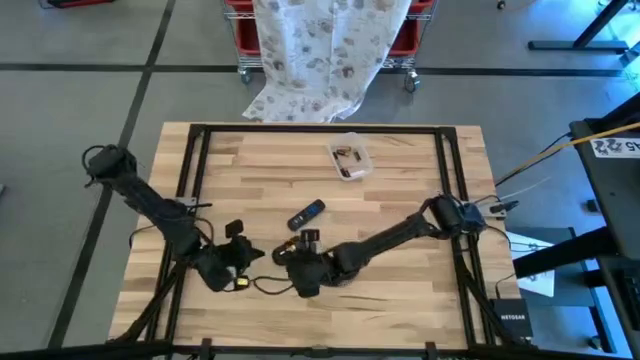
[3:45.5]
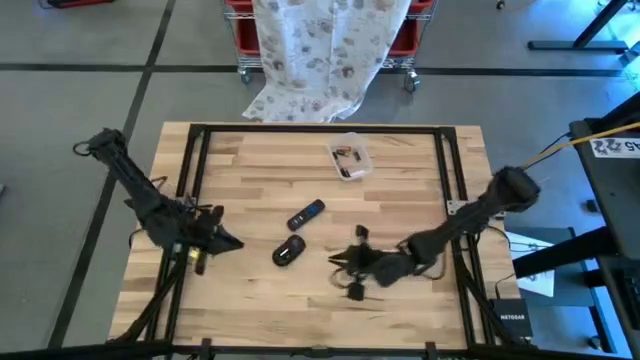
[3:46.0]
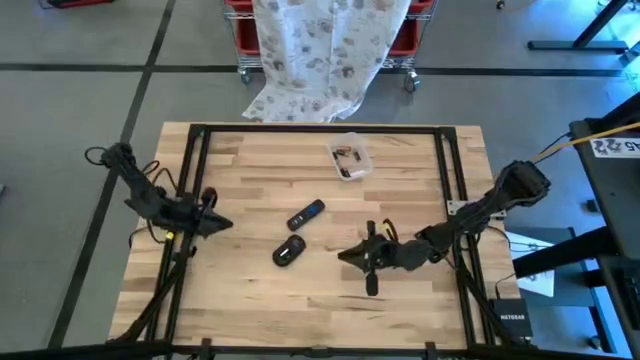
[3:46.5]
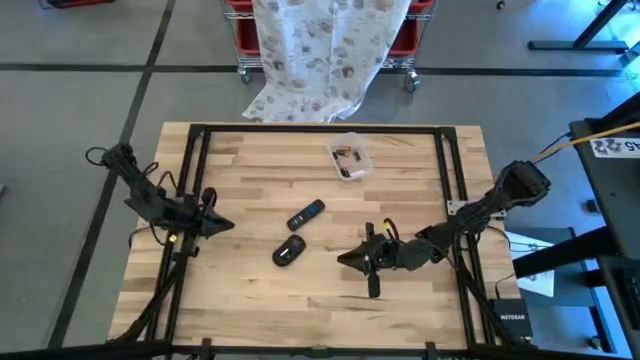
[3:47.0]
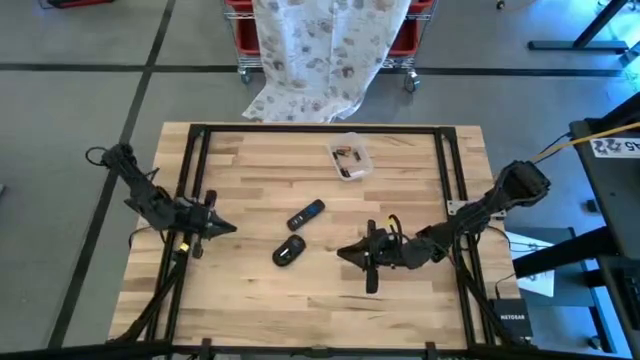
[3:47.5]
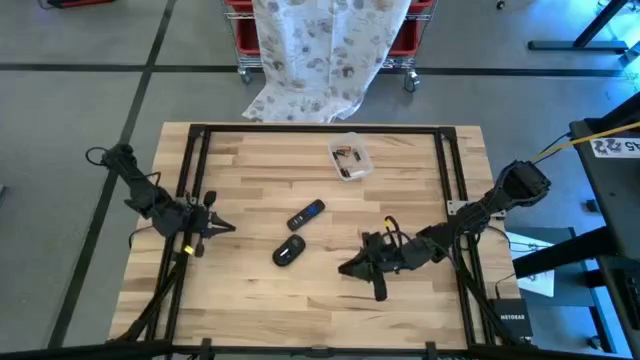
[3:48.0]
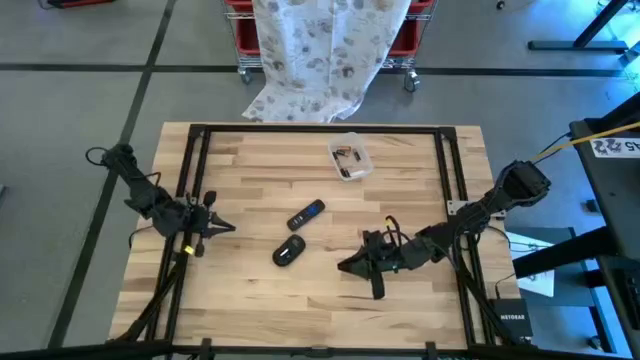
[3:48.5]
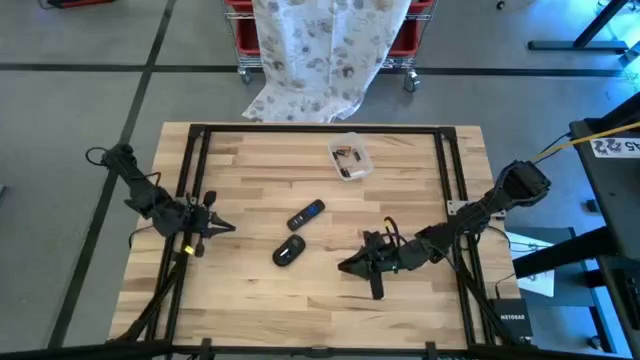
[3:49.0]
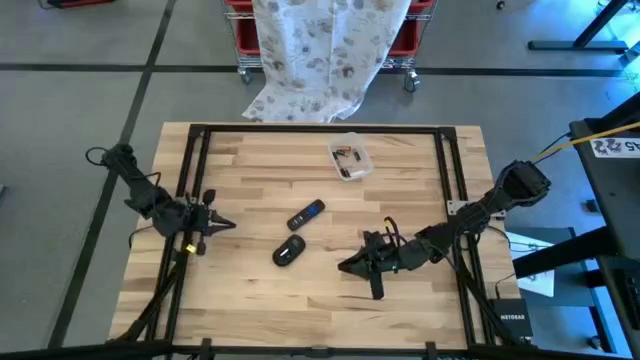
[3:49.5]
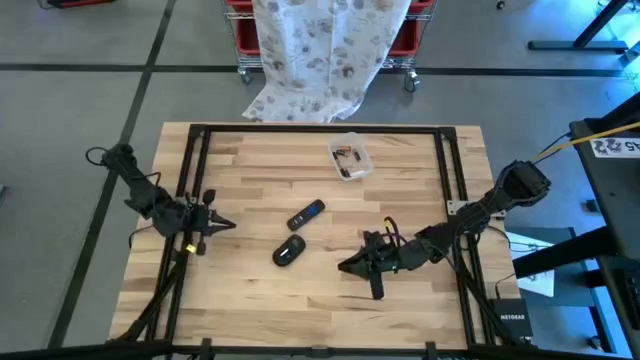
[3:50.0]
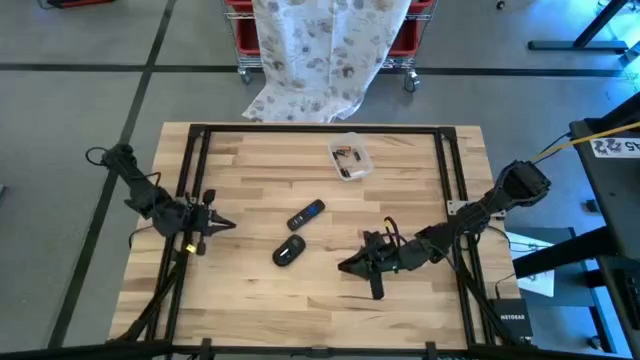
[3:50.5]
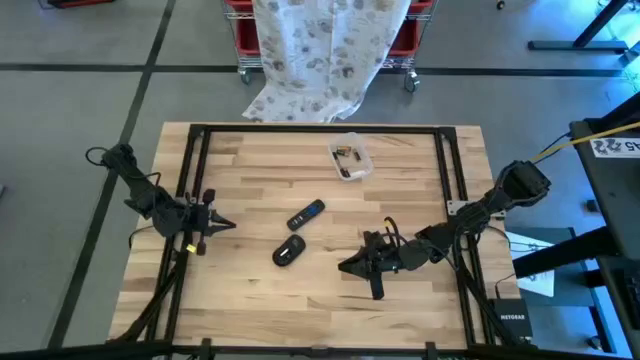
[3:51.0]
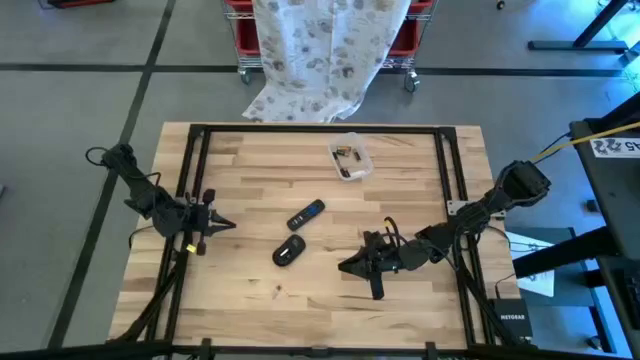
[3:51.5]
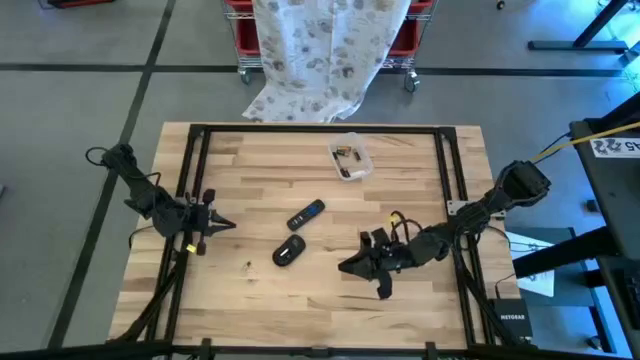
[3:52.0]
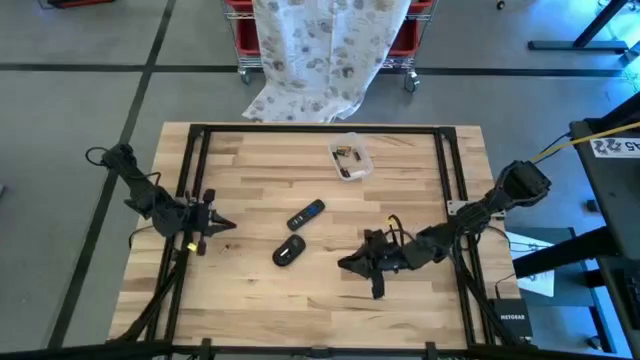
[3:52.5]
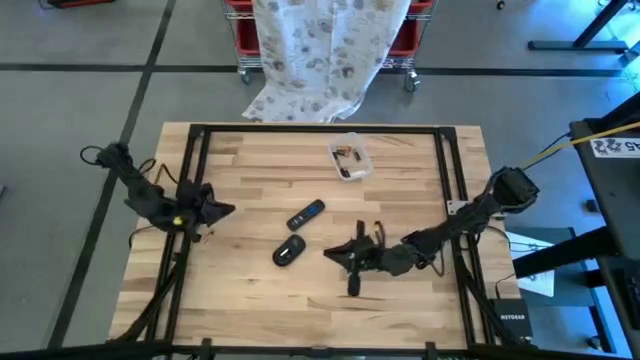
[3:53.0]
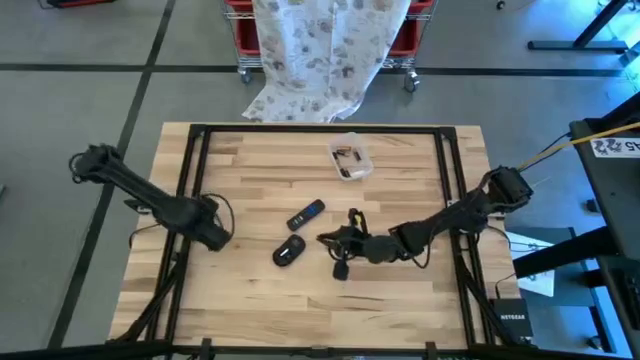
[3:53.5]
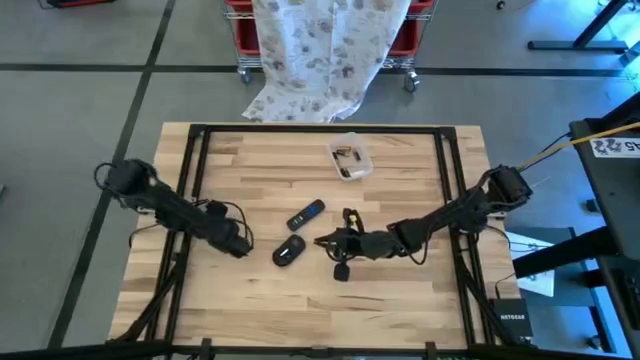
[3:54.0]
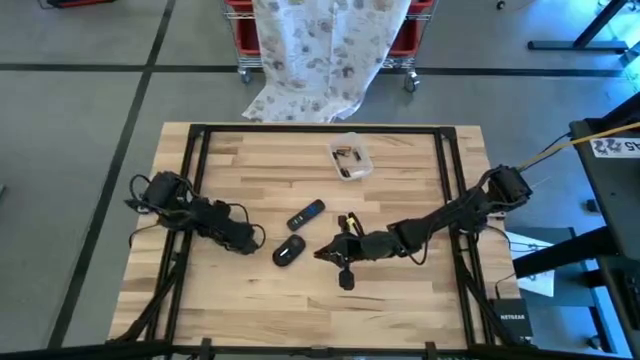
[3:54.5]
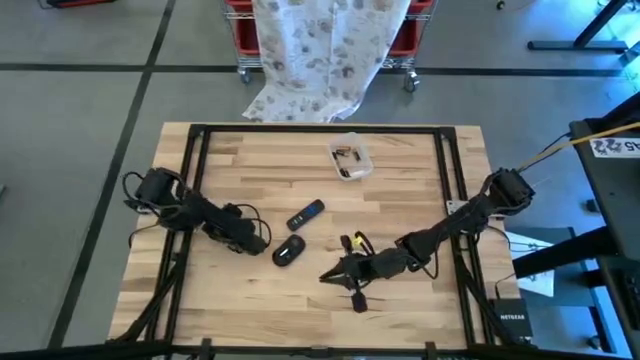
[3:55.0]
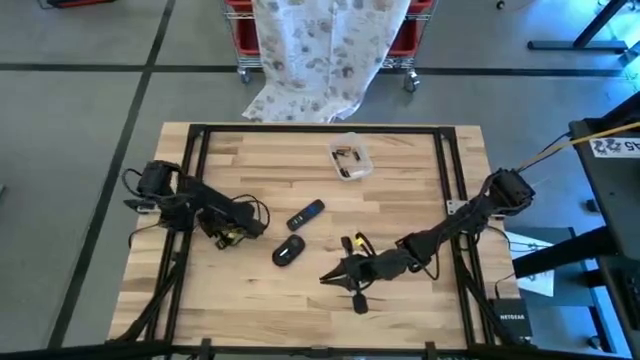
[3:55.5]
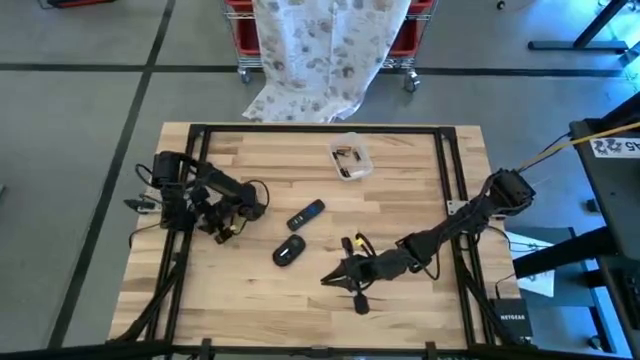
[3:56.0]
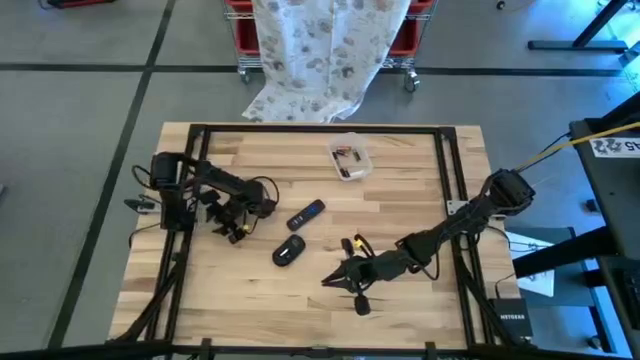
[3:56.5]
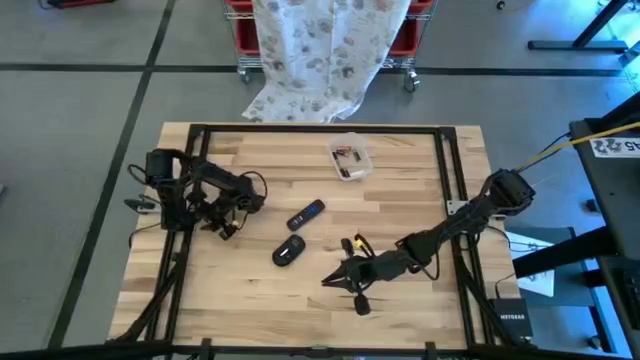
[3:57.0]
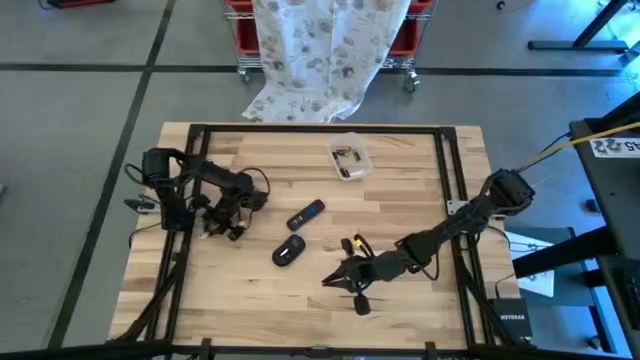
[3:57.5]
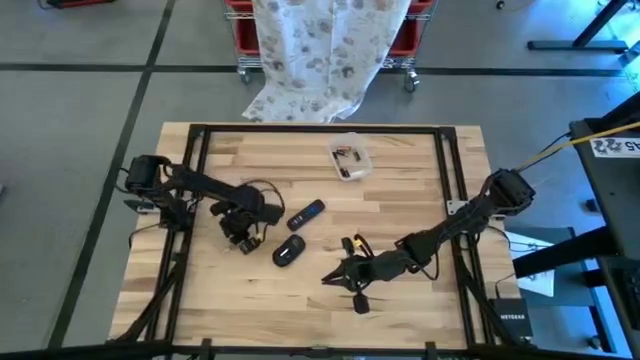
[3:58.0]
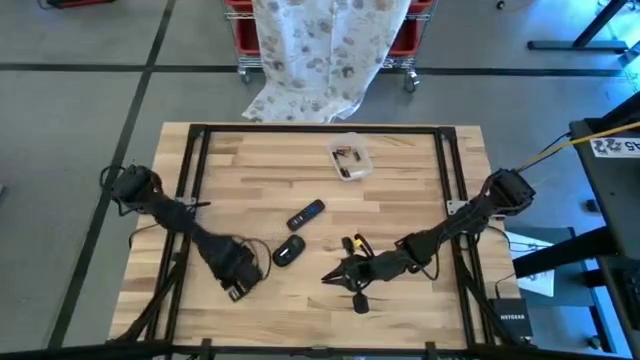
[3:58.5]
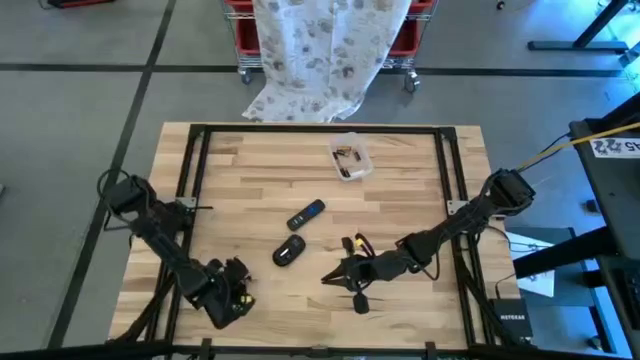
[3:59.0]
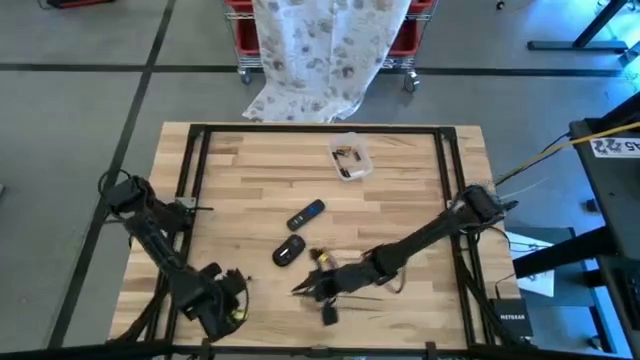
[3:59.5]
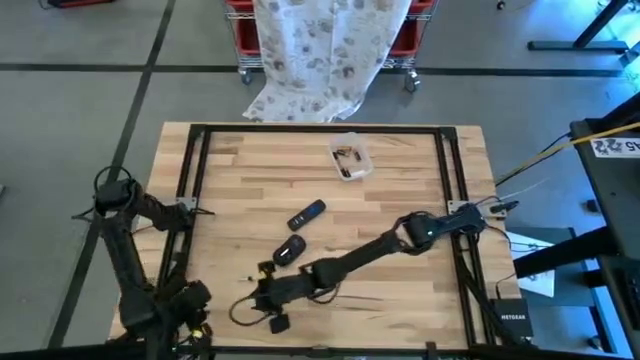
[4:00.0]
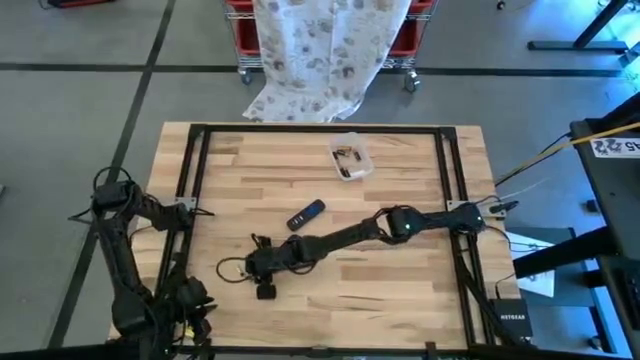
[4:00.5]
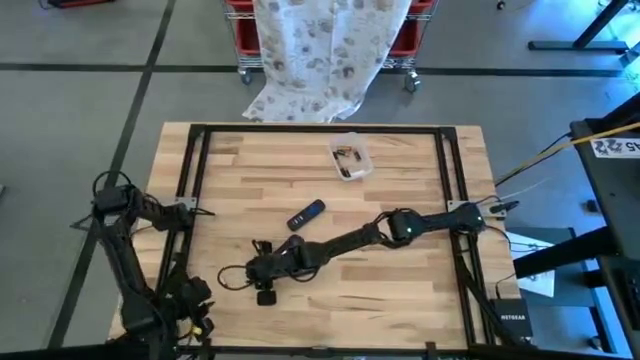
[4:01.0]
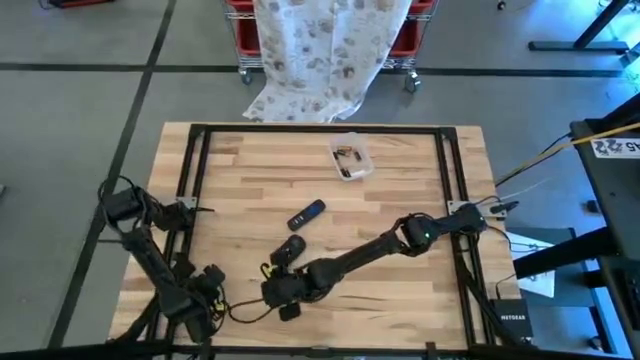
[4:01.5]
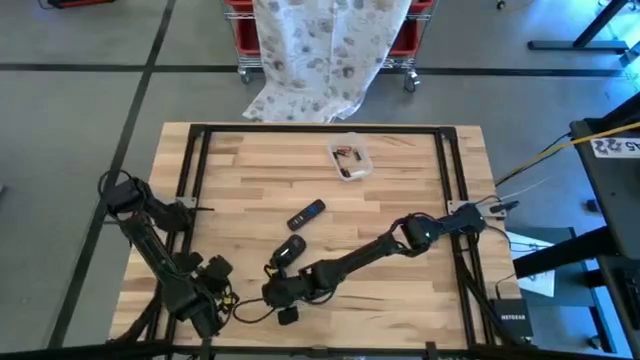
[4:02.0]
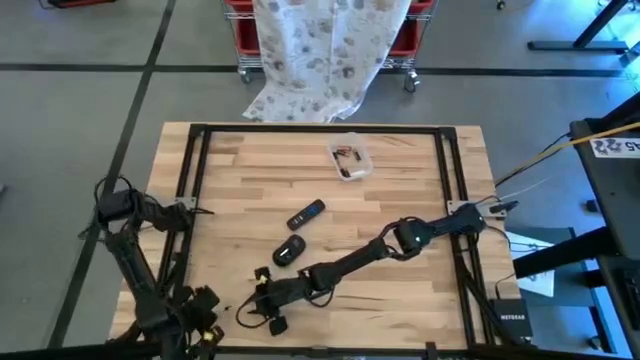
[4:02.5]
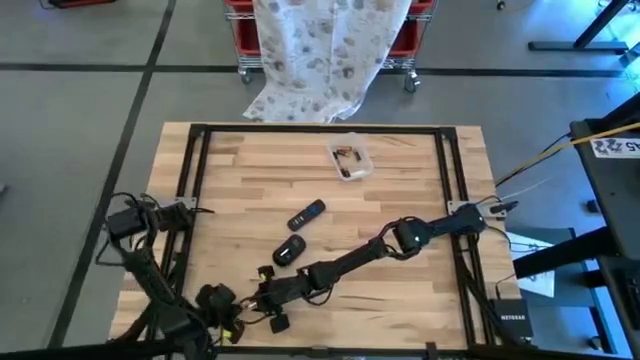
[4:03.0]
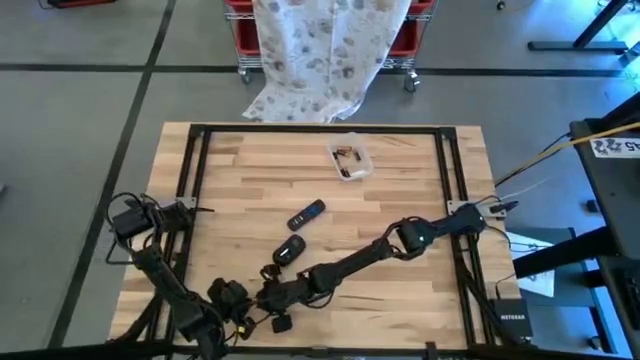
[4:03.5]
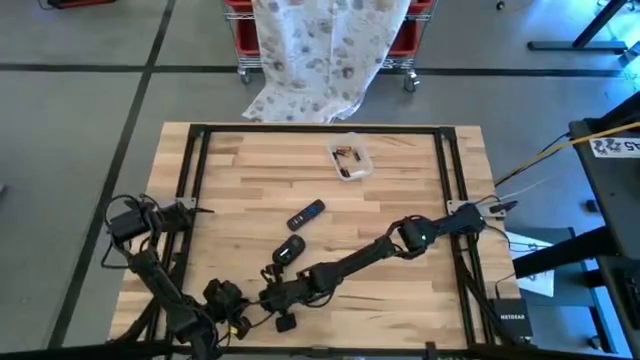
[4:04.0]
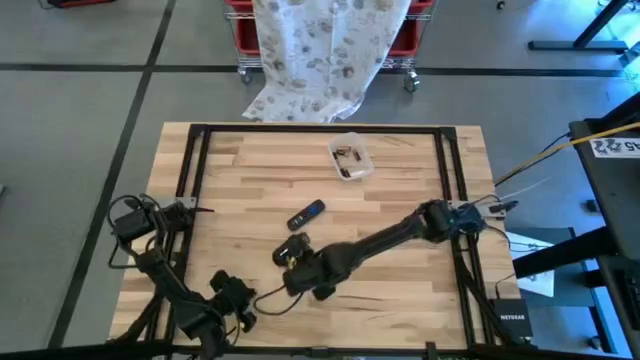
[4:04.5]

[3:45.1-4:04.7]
Task: Insert battery
Insert the white battery into the wireless mouse

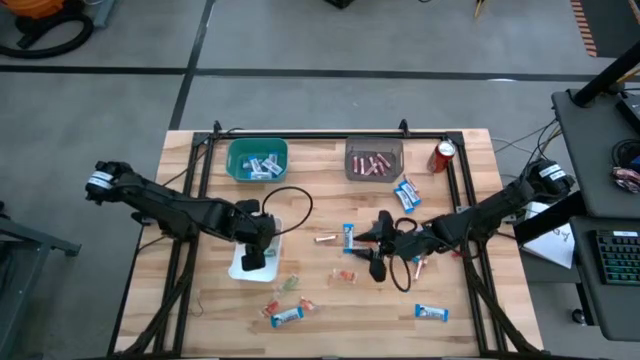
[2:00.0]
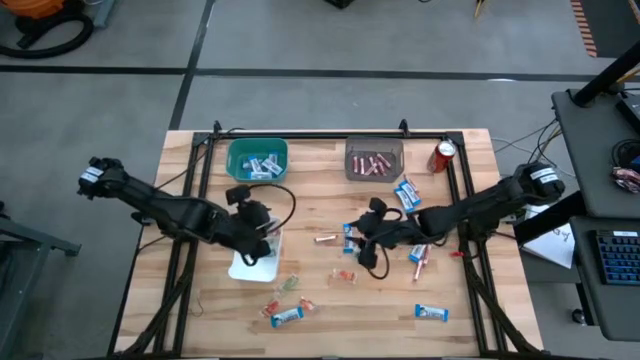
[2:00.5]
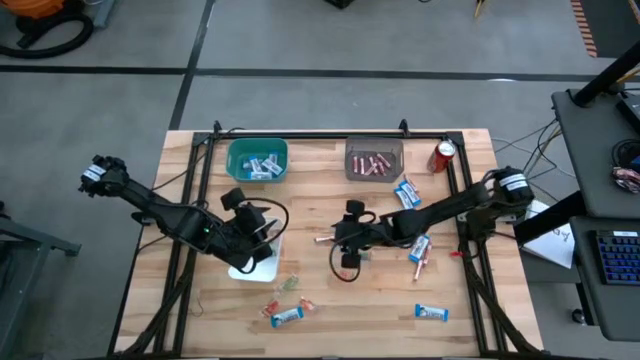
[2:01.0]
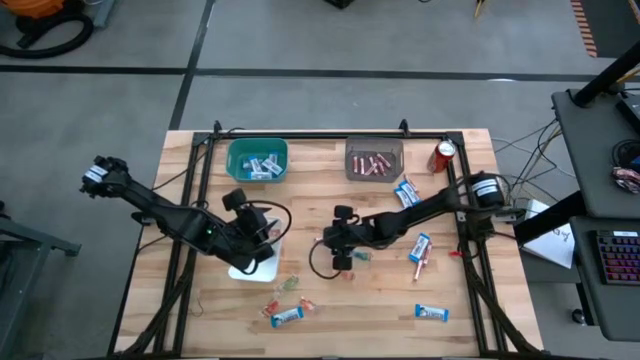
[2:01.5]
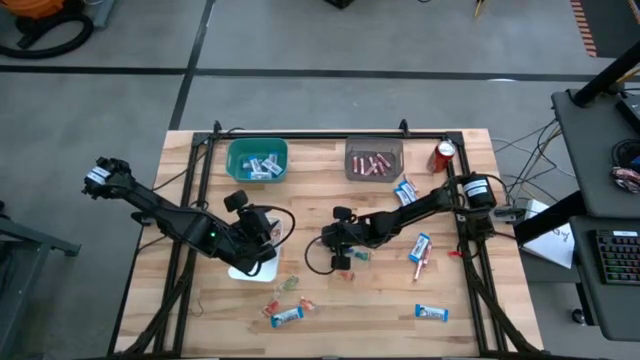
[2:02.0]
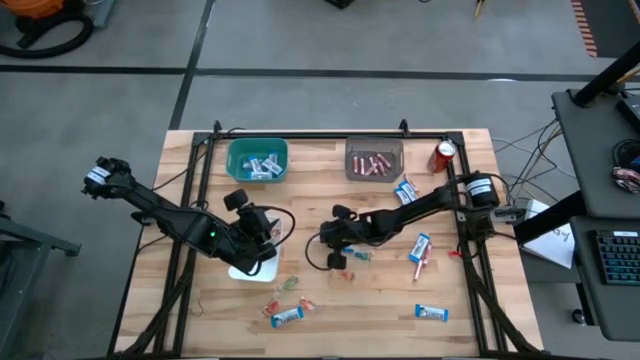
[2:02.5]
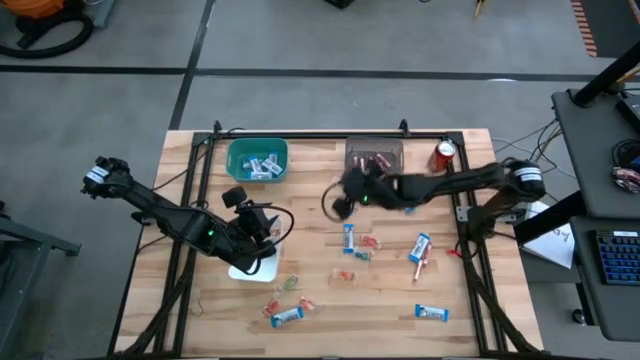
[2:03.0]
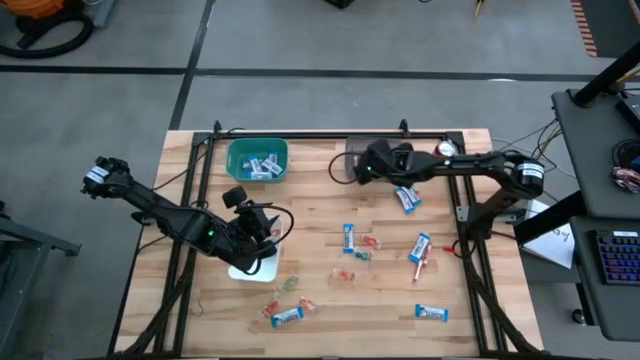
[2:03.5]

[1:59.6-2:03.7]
Task: Sort candy
Put the transparent candy rolls into the black bin
